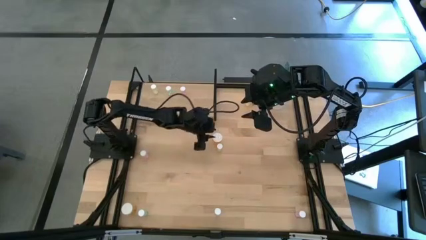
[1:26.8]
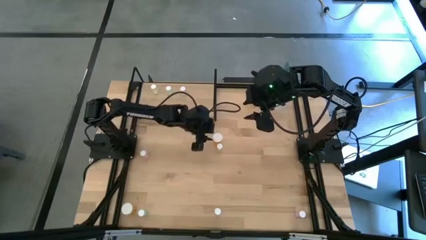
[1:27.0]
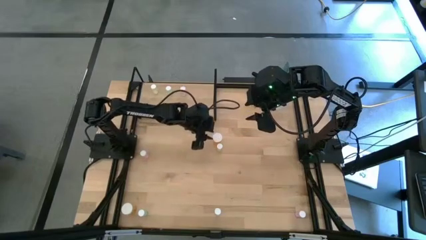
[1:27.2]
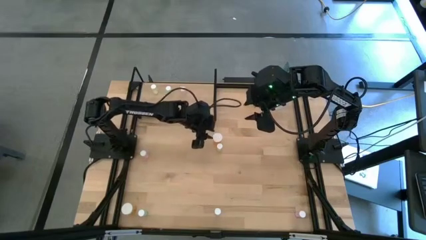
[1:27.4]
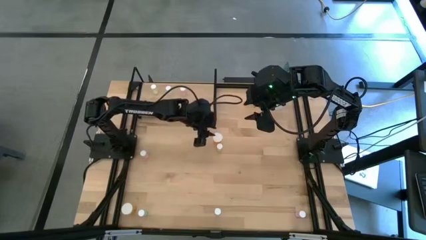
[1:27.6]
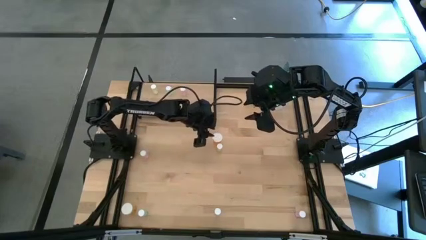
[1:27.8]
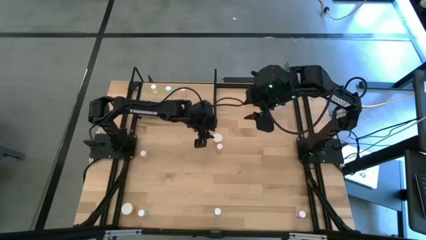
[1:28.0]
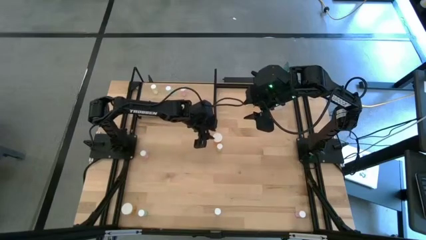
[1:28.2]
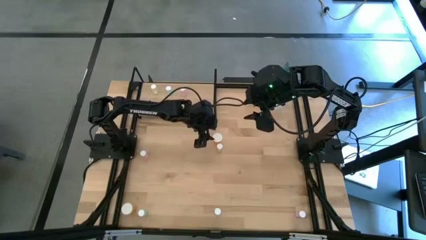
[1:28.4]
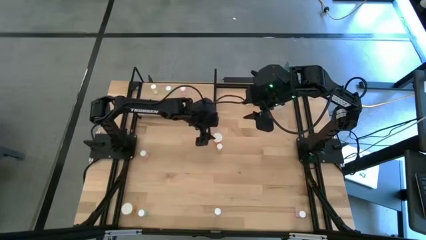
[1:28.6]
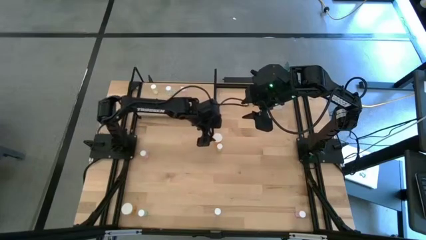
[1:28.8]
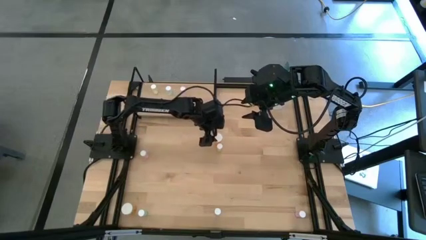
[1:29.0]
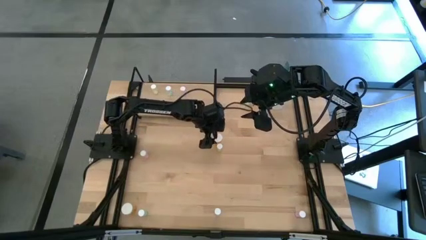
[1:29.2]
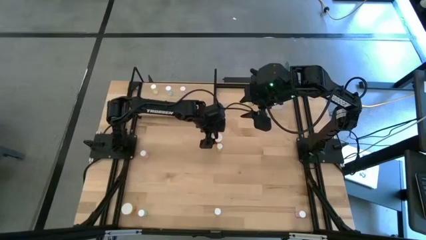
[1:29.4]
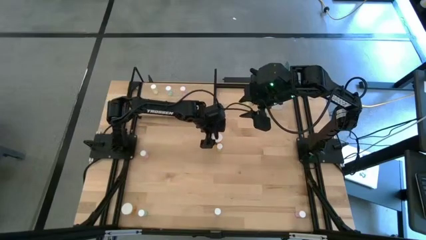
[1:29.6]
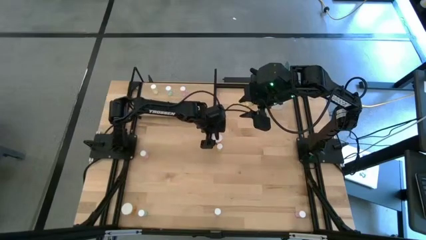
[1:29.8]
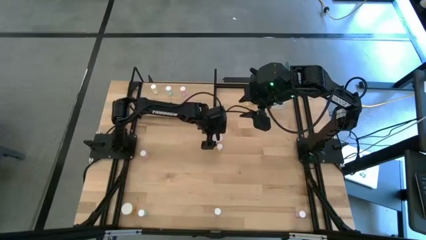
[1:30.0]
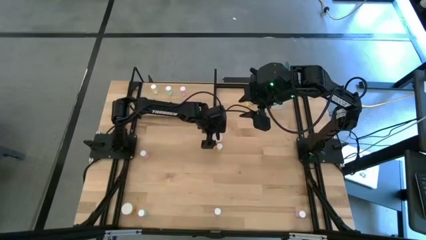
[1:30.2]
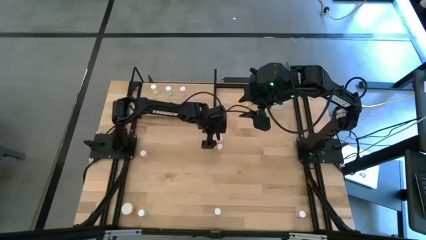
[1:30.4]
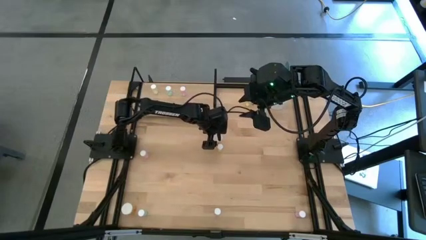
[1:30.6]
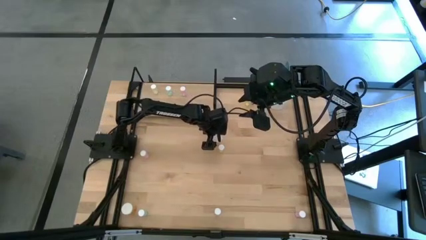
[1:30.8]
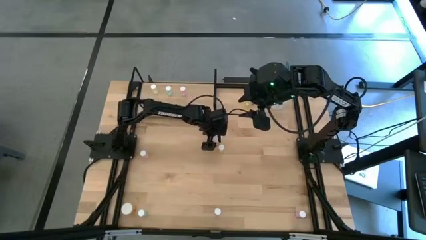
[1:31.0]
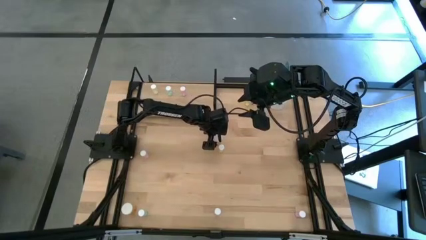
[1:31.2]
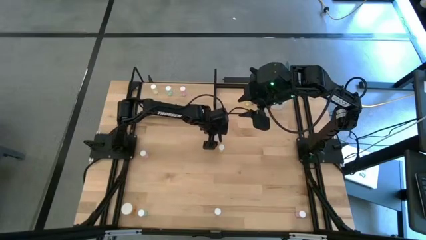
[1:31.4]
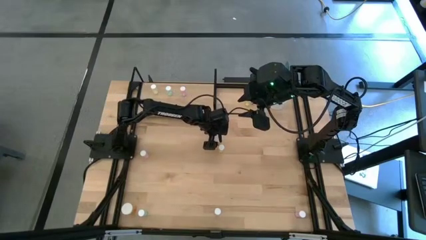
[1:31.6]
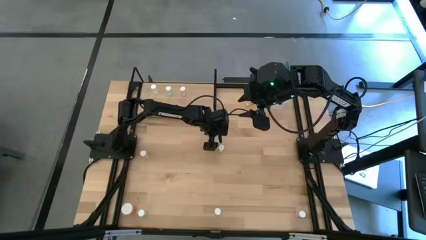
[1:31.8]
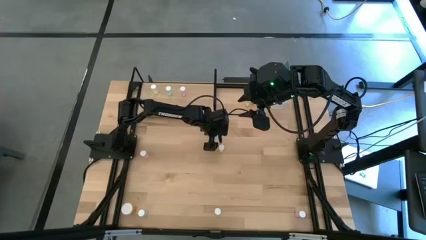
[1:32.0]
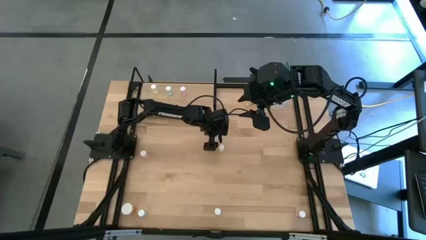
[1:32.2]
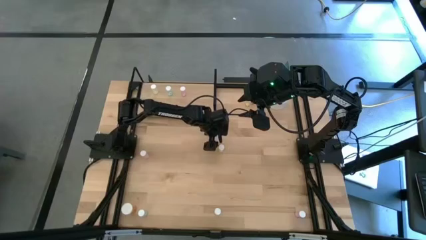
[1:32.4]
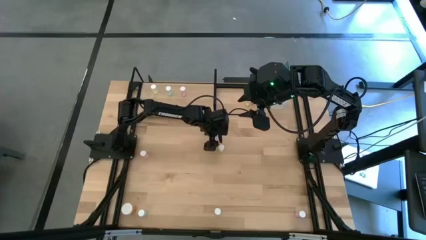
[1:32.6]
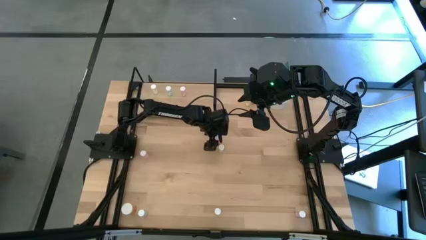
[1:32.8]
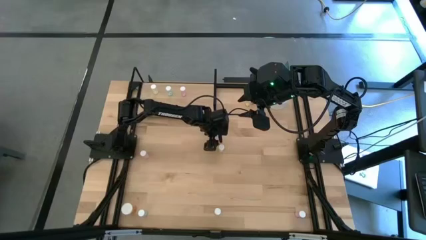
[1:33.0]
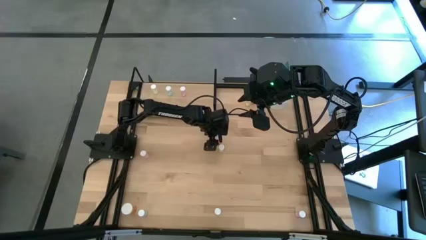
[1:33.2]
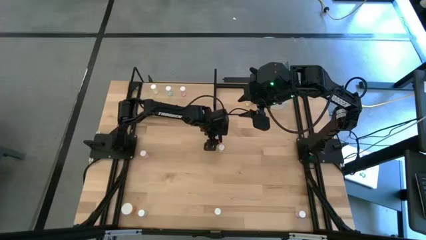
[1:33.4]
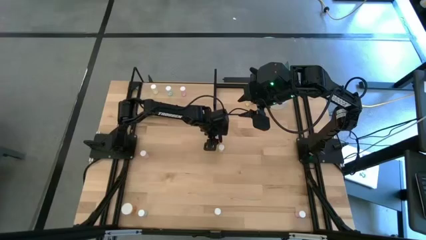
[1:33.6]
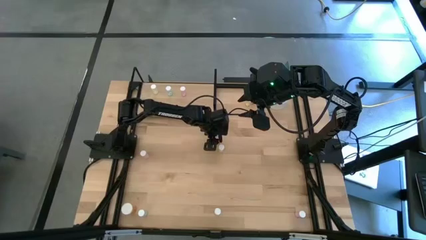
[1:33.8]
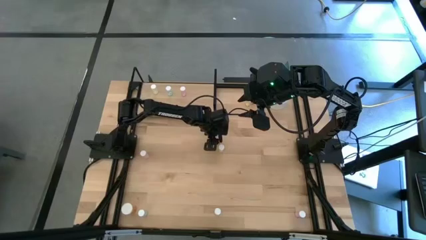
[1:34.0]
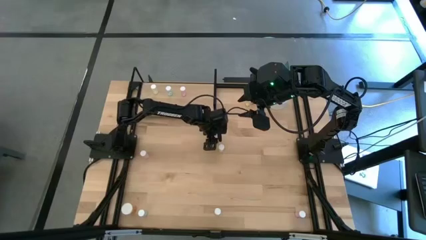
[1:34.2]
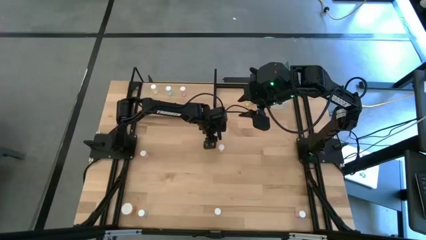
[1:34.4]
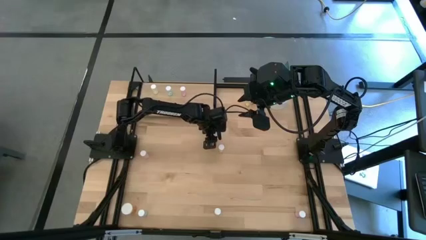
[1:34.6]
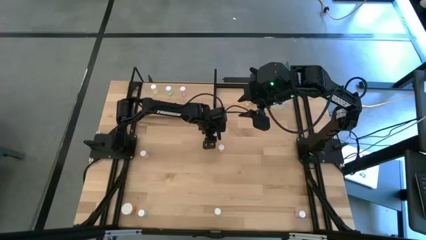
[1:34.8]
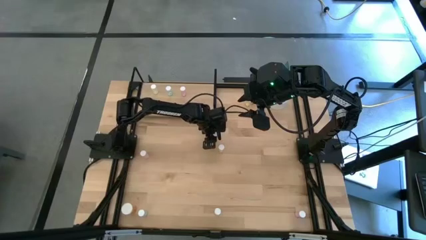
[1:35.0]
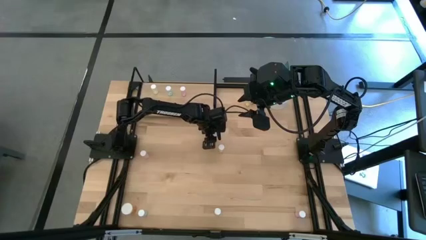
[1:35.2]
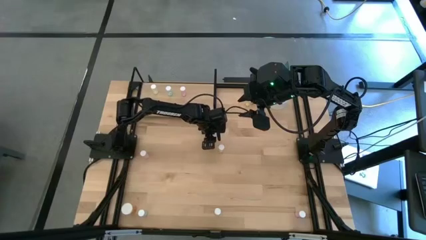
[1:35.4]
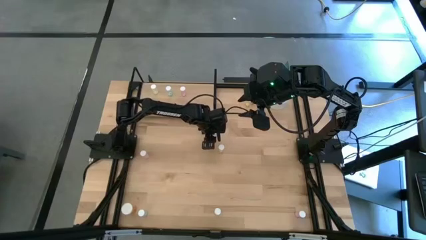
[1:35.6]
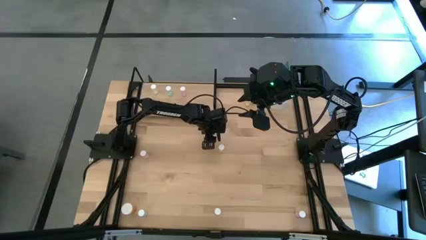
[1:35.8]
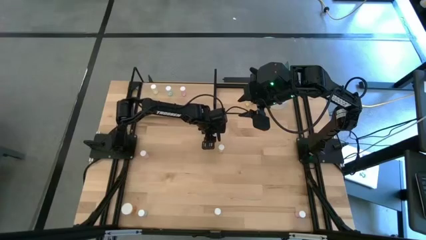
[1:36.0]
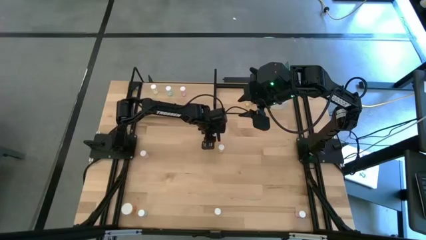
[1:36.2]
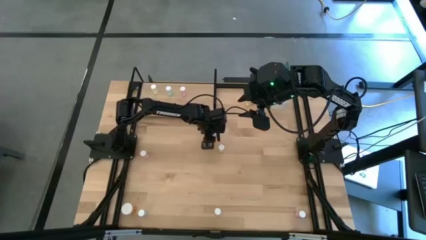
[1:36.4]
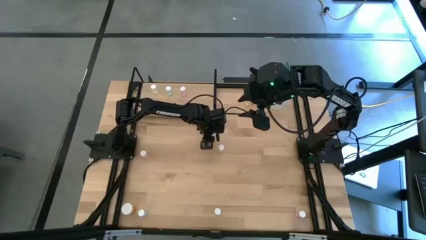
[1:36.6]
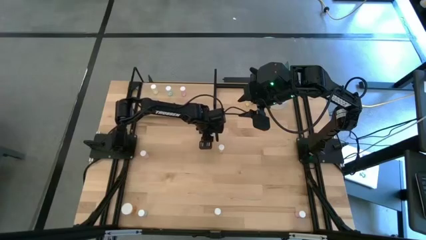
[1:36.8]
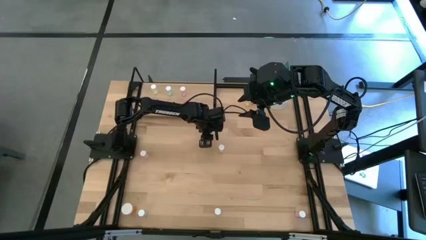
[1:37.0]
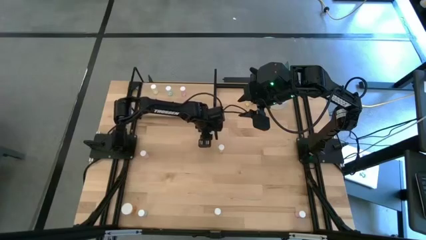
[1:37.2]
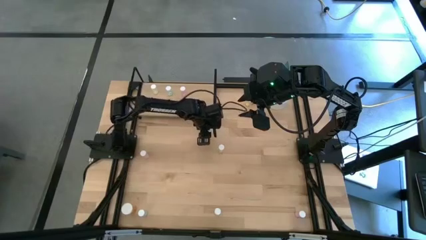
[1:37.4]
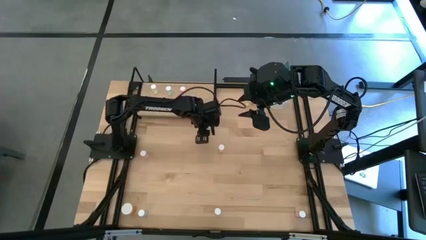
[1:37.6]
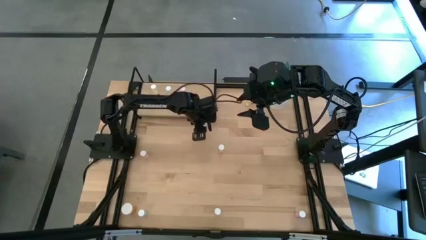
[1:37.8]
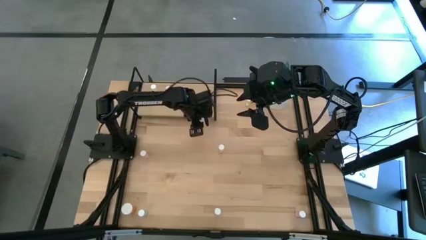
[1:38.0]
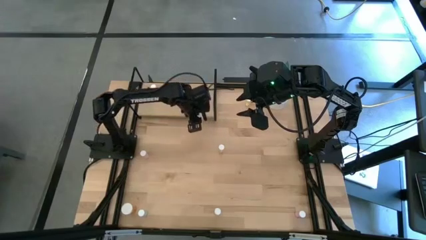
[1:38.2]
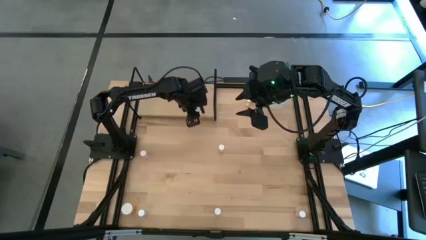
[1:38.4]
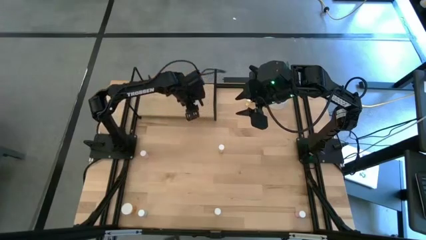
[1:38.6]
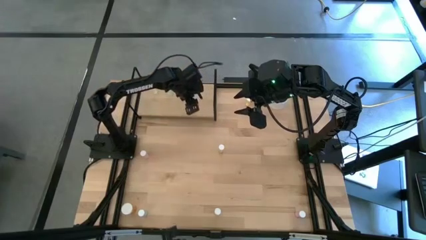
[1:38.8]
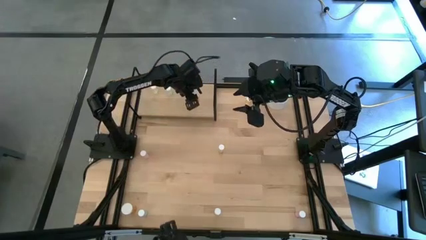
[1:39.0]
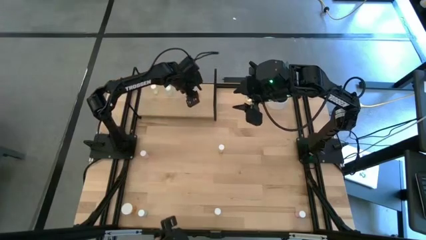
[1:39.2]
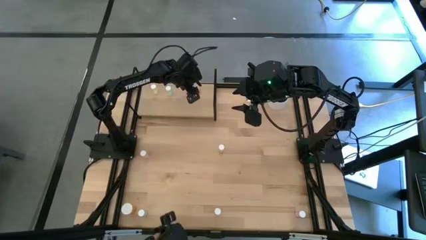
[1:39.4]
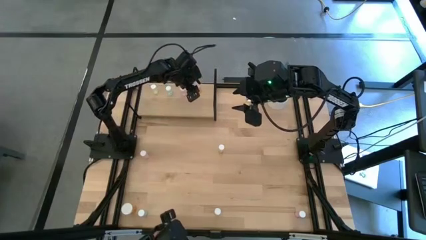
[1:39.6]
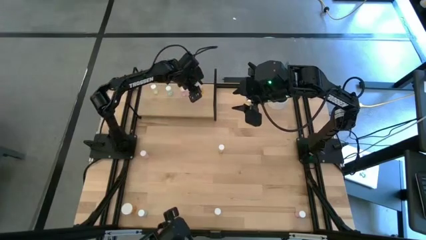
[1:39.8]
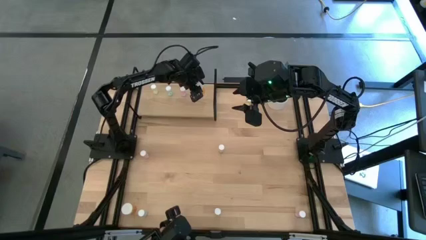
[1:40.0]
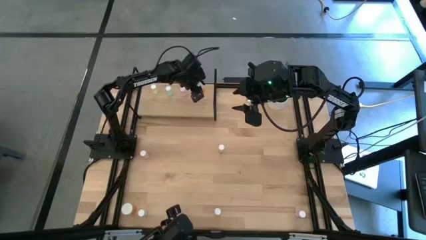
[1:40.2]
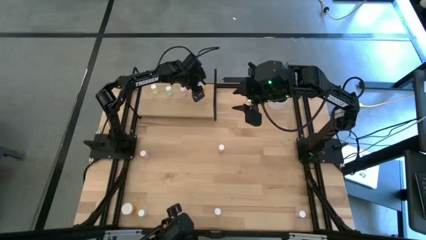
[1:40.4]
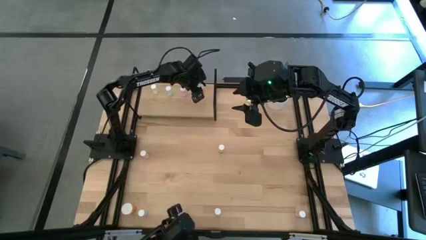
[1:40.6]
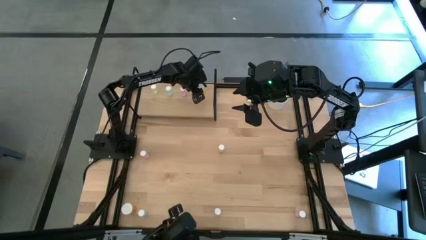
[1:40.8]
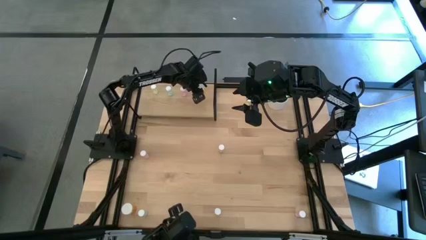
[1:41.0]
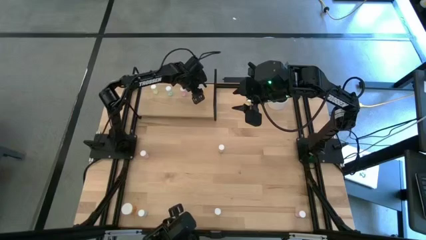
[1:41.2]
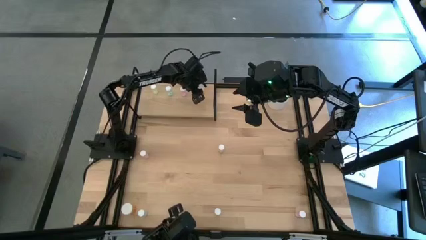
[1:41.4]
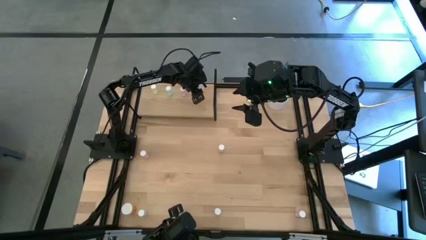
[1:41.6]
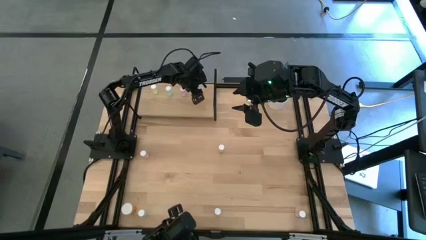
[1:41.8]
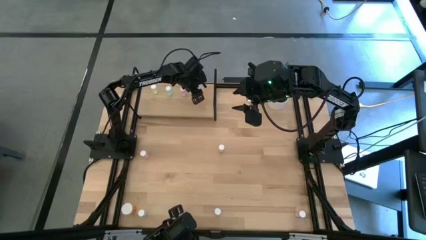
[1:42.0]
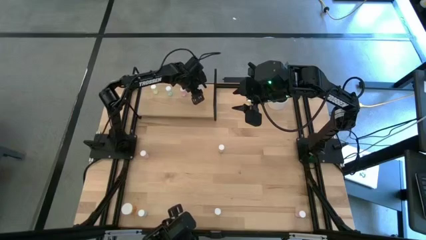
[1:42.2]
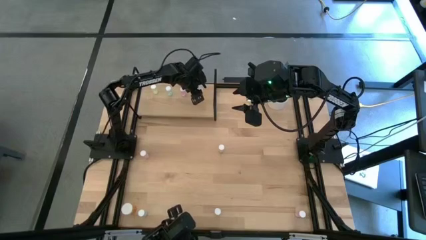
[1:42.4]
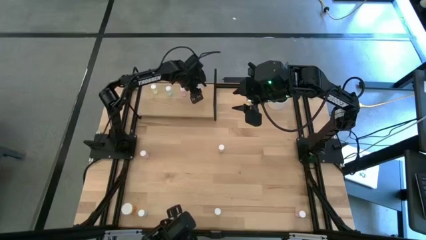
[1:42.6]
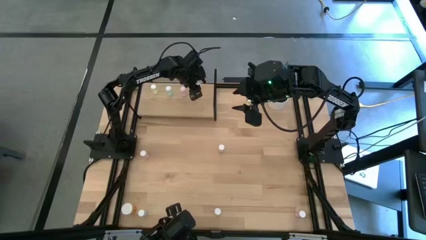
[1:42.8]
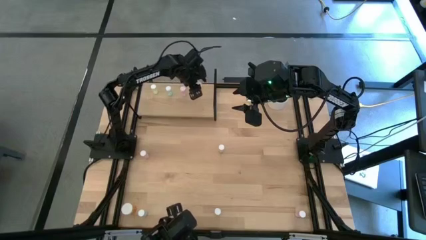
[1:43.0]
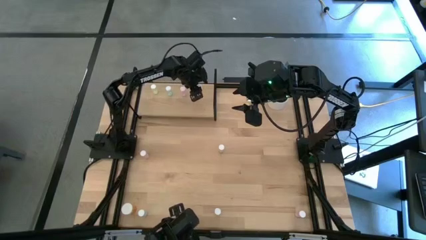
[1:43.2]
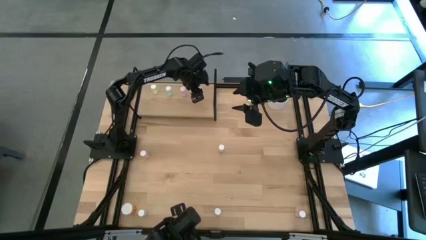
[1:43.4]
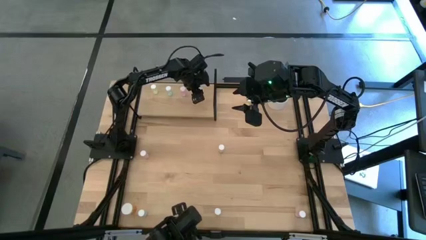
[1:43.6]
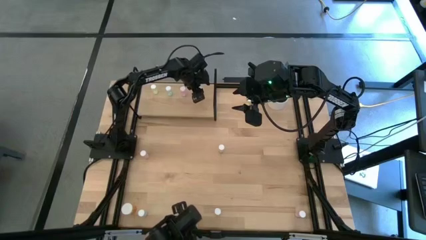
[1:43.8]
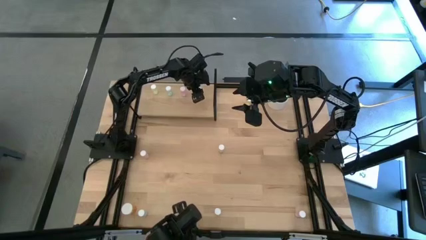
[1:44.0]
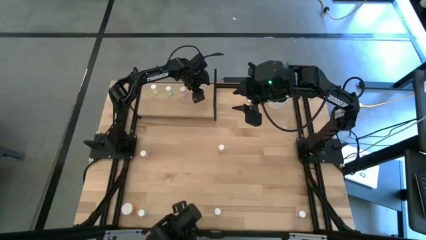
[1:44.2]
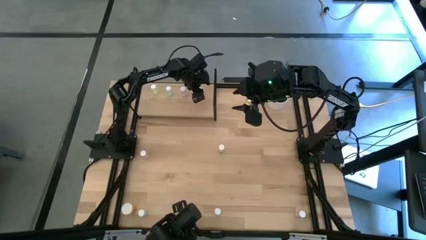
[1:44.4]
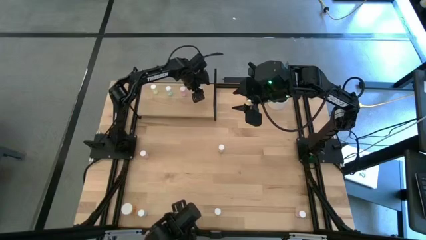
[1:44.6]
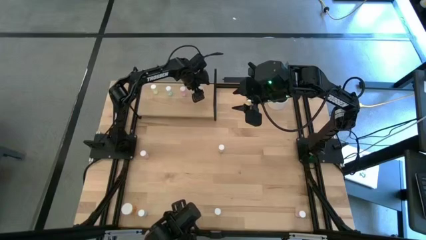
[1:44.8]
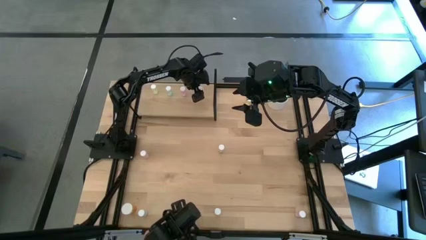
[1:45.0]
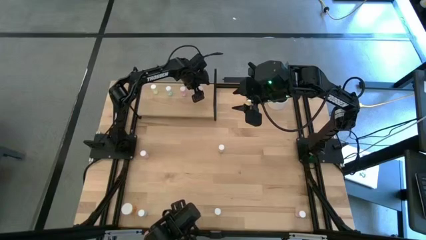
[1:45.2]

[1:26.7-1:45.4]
Task: Pick and place medicine bottles onto shelf by color
Put the middle orange pill bottle on the shelf
